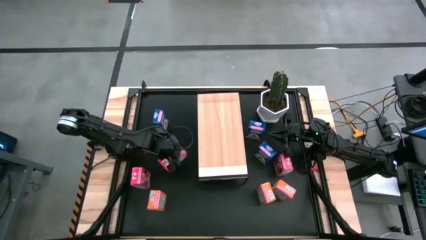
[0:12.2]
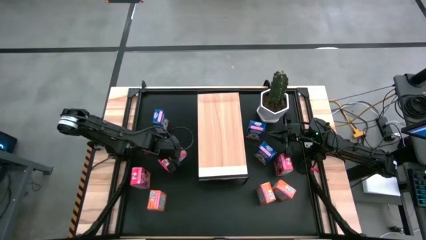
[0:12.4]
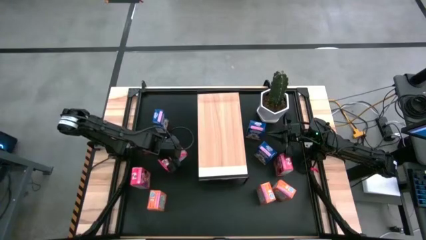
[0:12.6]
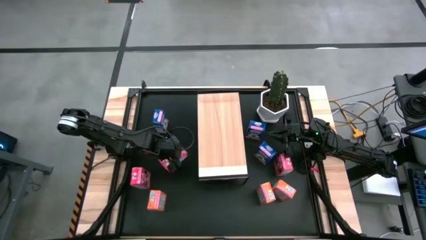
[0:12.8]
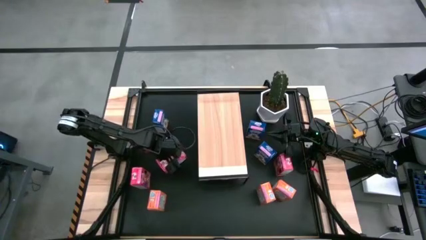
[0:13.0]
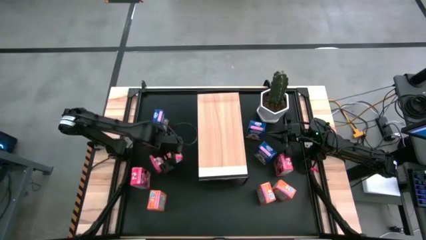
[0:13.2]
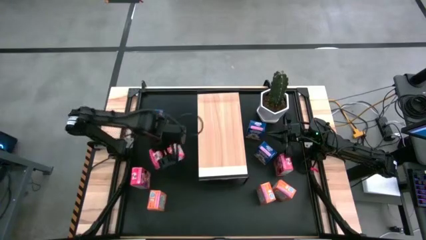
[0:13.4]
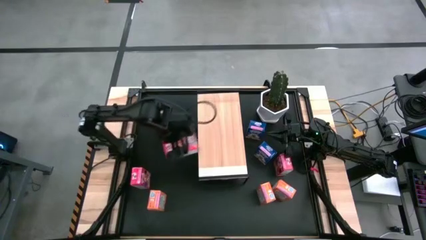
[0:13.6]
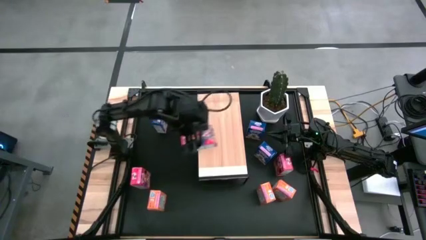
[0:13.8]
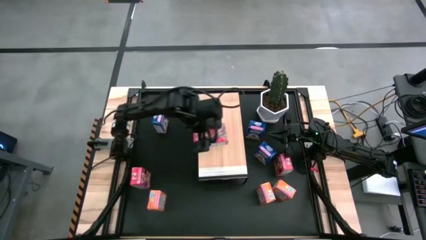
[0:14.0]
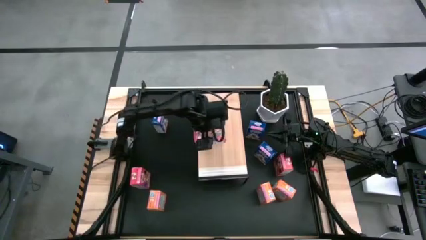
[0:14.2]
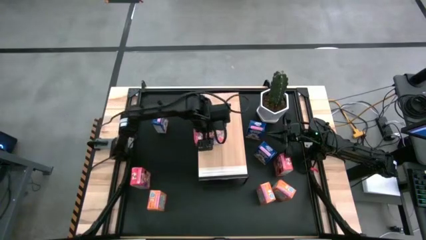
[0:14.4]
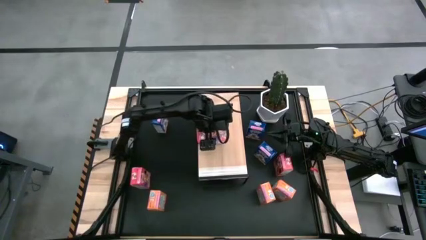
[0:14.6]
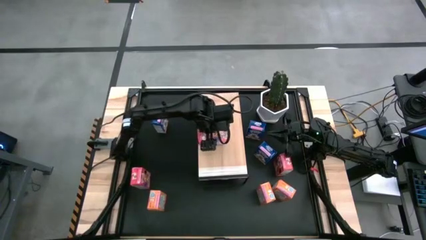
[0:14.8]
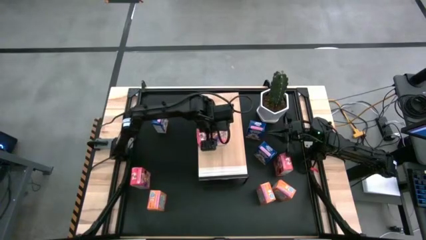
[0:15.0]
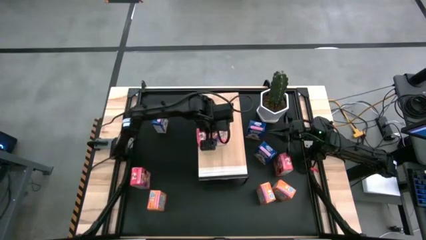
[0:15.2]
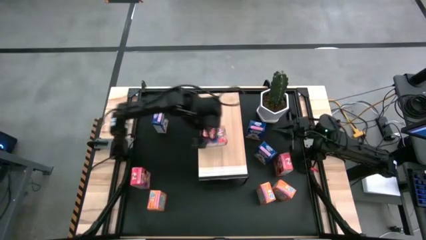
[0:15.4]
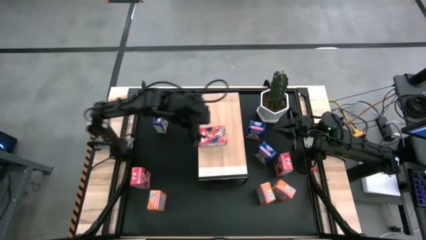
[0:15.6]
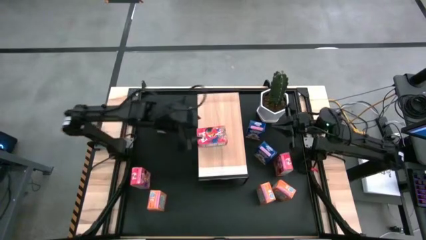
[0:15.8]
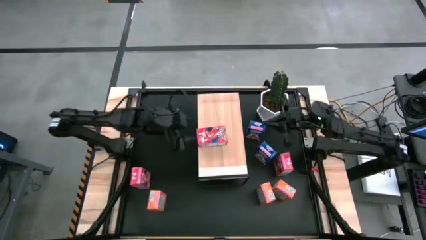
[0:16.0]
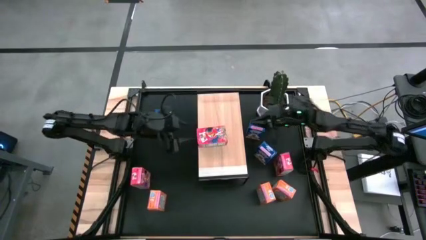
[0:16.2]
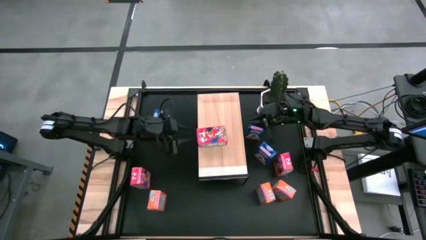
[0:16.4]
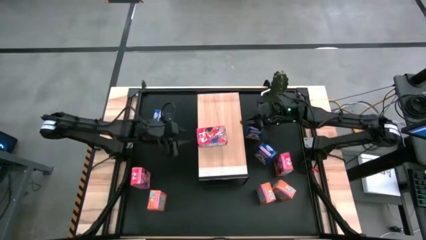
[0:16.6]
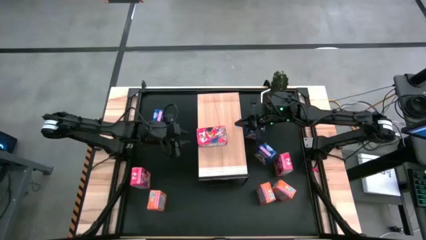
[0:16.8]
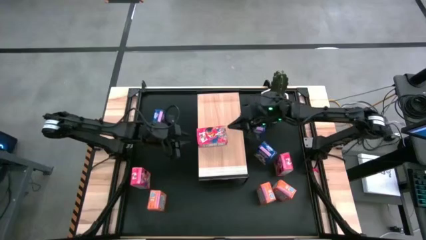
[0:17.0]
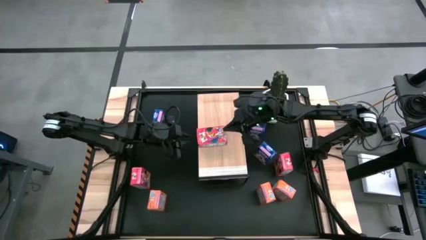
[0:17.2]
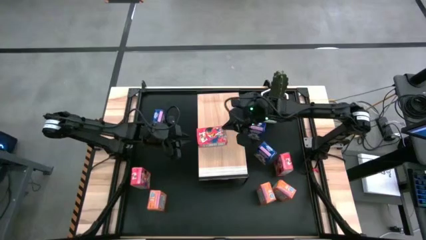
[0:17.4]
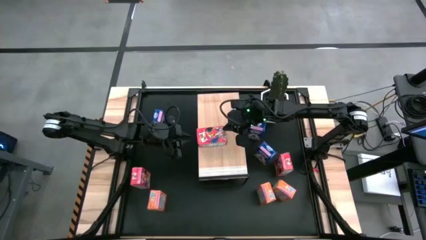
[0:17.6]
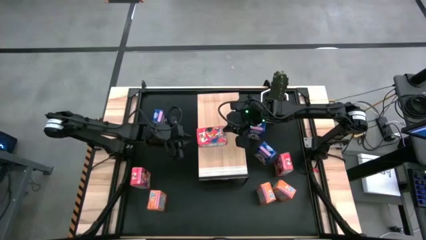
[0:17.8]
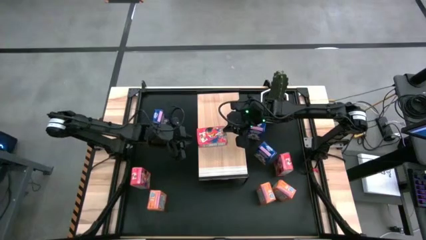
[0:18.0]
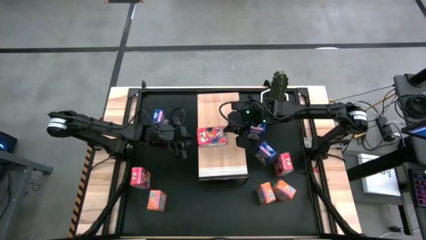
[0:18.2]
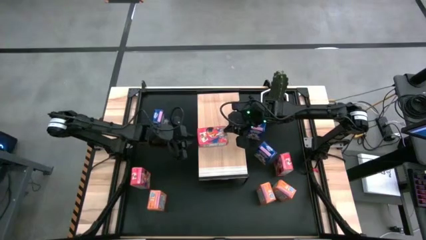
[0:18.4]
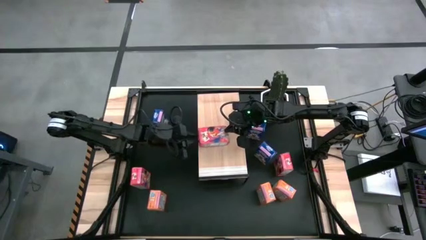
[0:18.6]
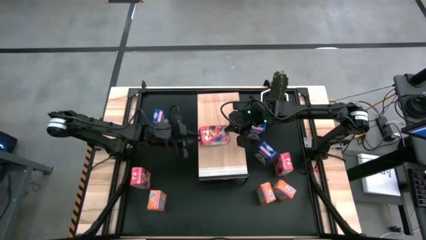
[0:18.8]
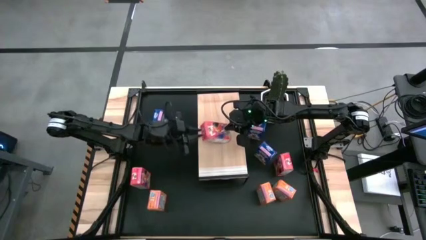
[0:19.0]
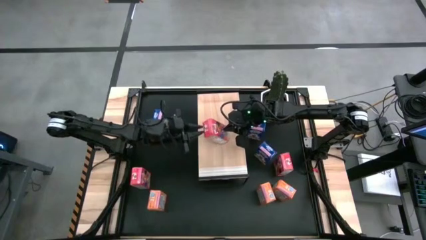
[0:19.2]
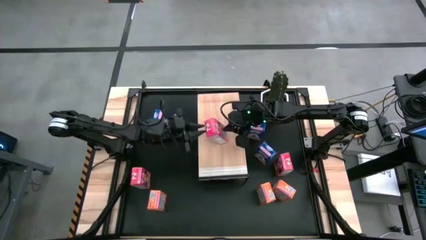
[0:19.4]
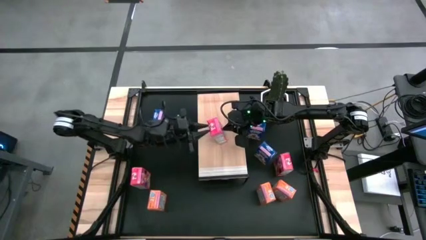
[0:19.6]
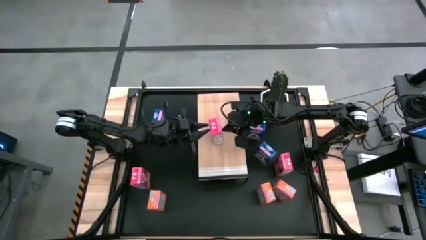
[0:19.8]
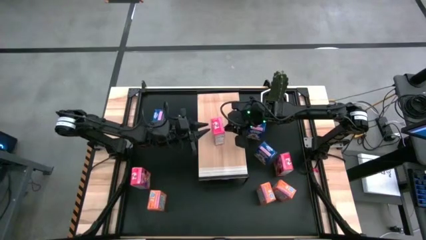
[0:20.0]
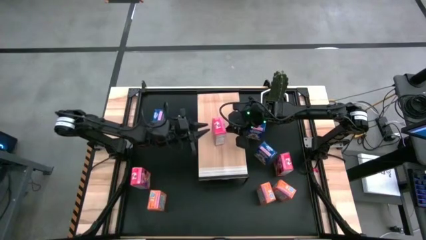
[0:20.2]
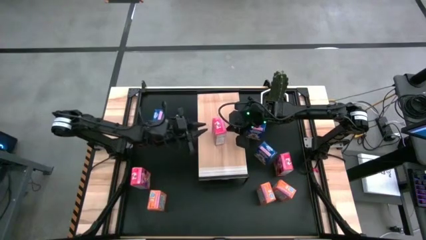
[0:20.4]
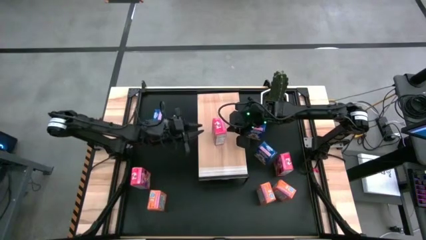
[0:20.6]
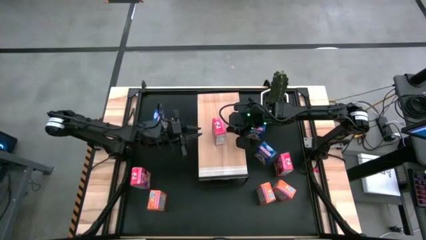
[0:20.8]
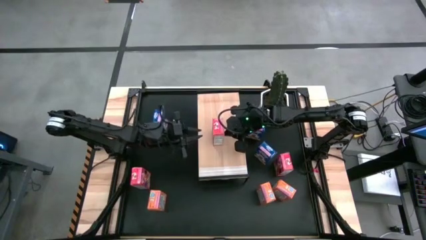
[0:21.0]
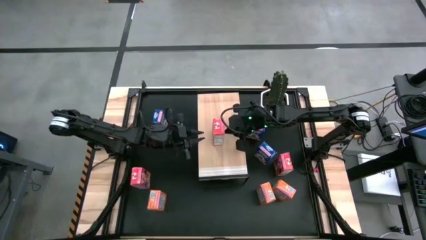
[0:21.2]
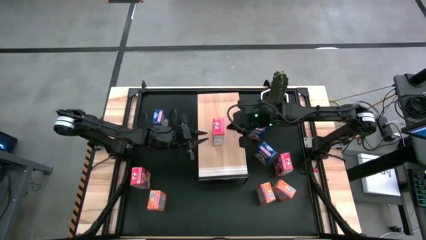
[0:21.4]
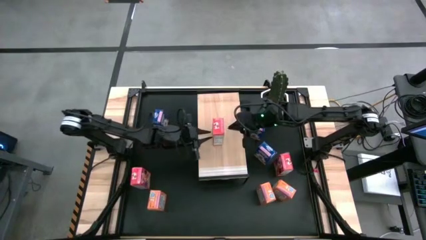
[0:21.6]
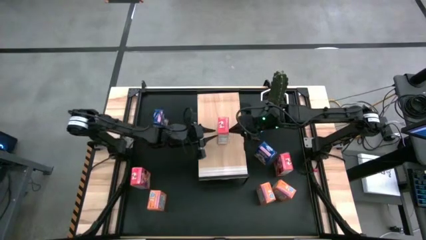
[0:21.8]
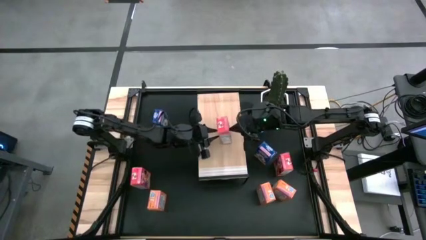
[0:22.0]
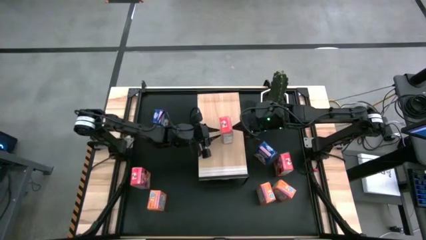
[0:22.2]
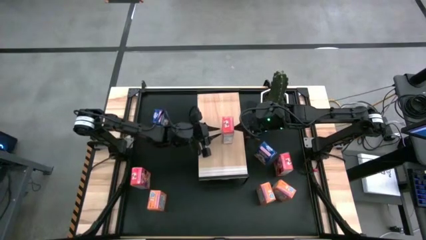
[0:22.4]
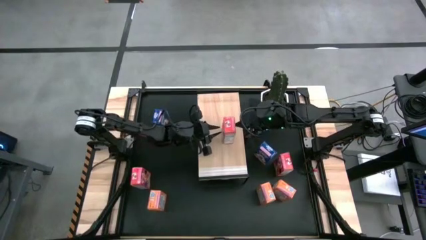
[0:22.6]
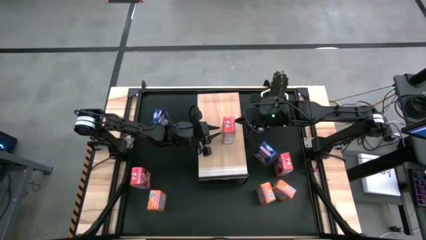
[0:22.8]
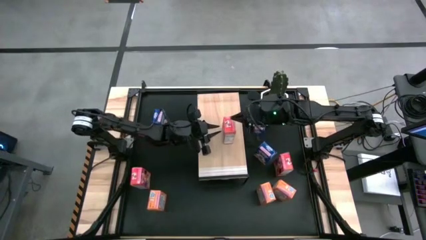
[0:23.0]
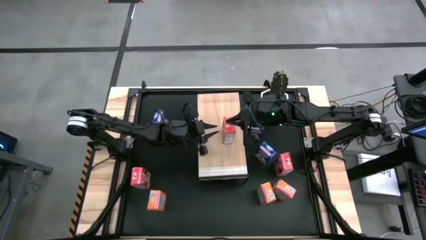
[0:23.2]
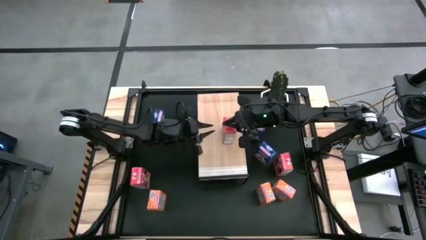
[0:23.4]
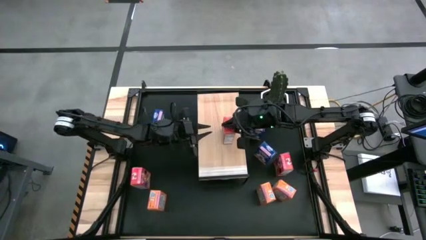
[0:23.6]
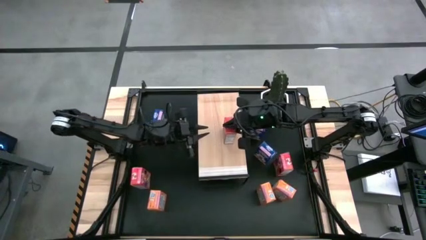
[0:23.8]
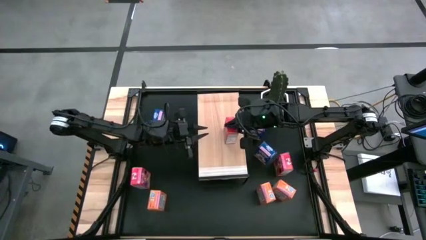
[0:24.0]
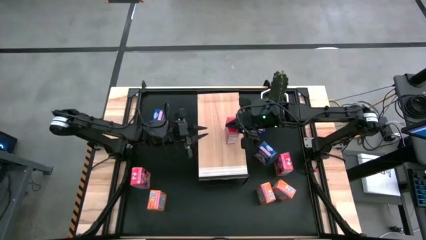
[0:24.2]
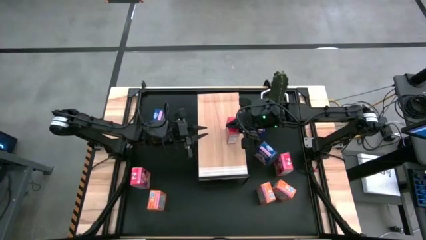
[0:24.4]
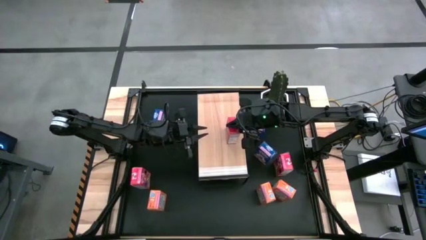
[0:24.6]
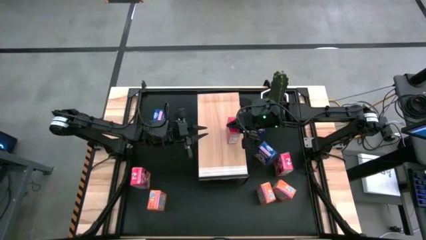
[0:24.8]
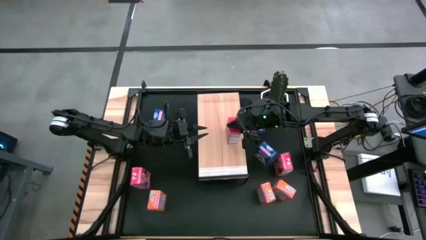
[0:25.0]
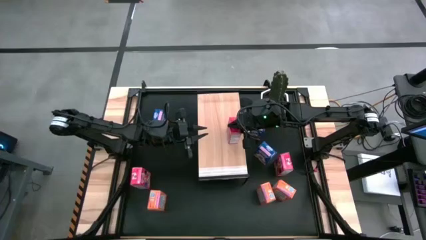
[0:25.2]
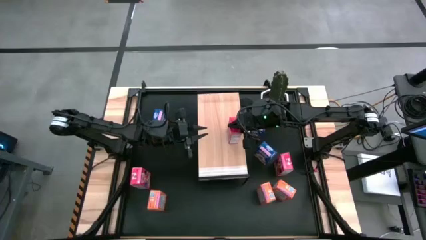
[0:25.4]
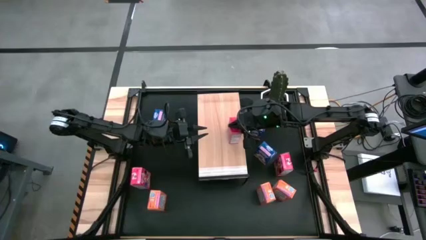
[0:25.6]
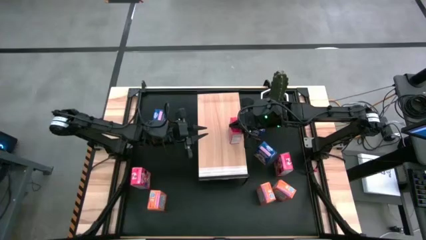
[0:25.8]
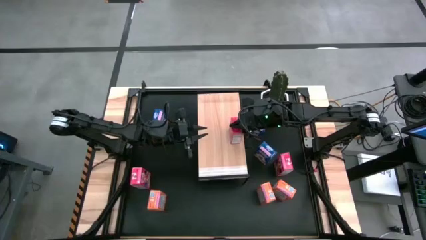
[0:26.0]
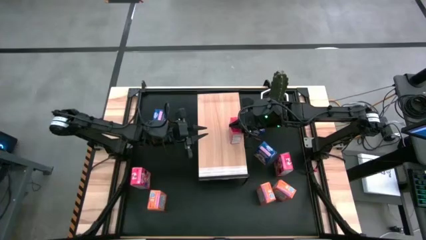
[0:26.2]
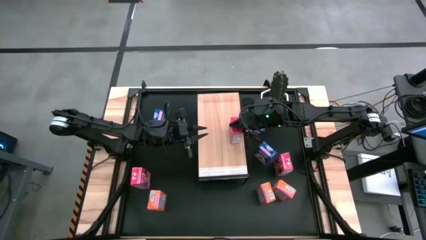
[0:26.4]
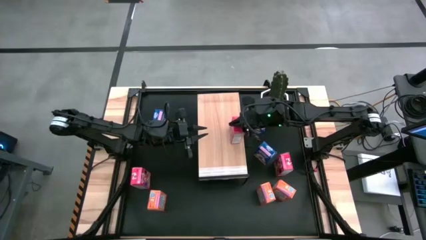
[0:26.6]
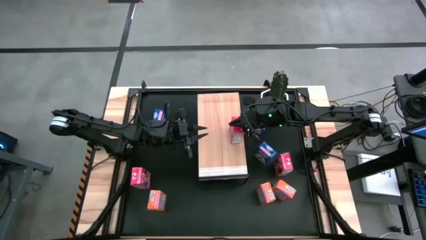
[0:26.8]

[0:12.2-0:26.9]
Task: Stack cereal on shelf
Put the top left red cereal box on the shelf
